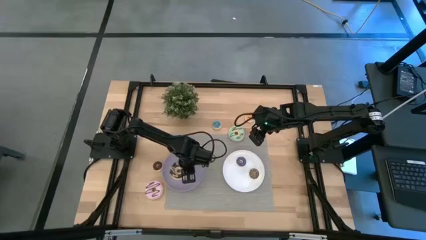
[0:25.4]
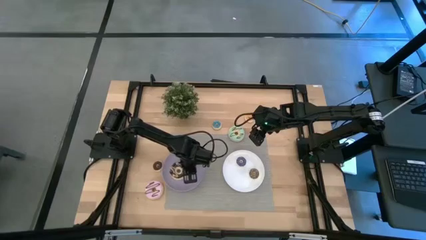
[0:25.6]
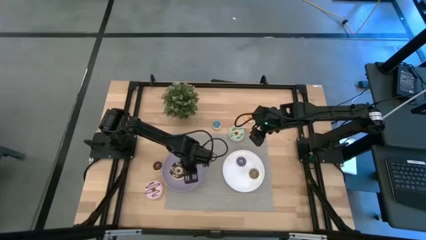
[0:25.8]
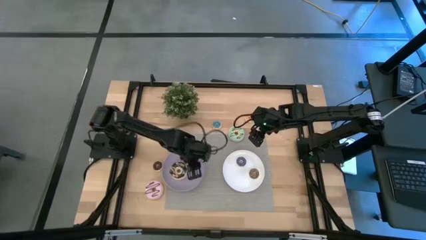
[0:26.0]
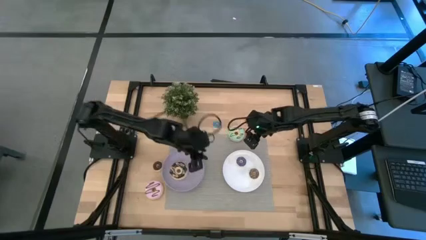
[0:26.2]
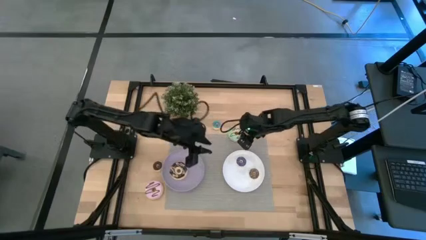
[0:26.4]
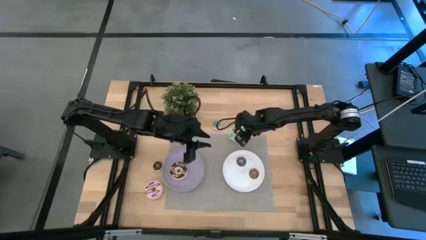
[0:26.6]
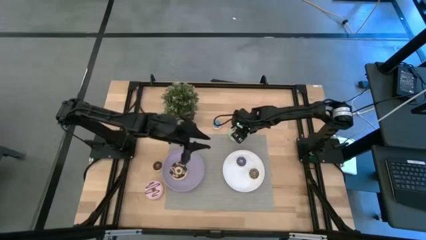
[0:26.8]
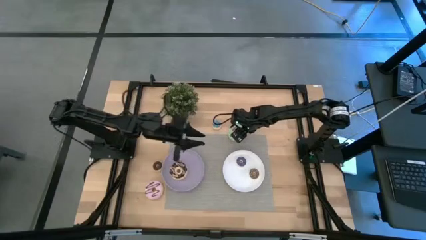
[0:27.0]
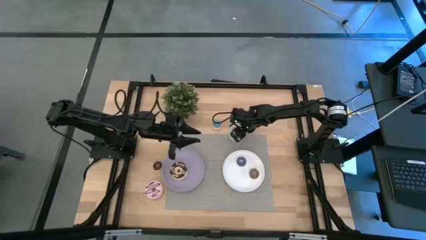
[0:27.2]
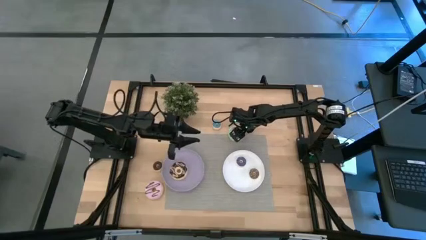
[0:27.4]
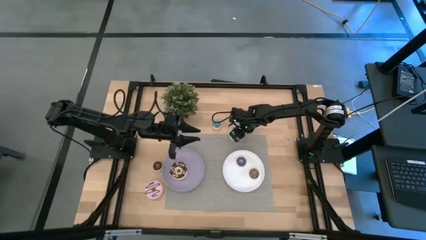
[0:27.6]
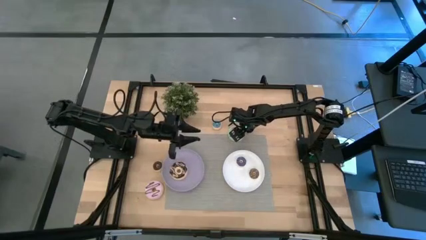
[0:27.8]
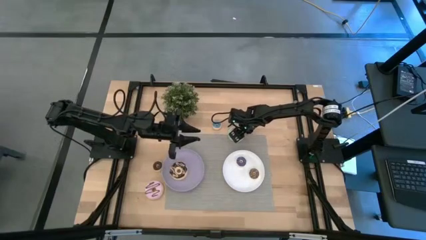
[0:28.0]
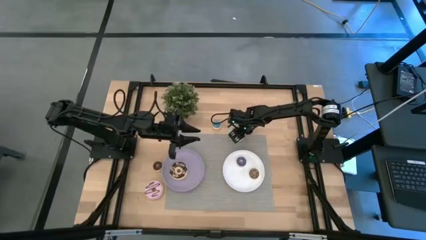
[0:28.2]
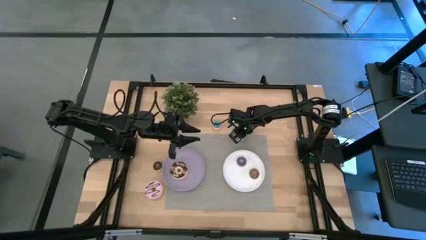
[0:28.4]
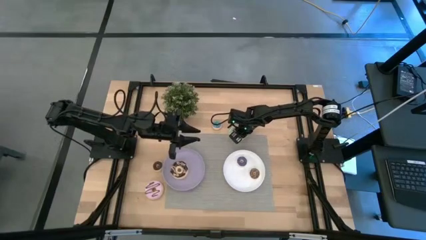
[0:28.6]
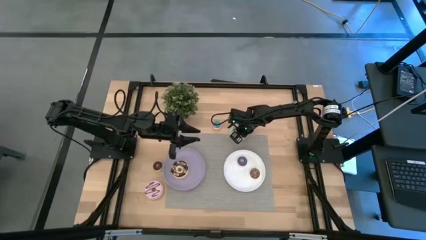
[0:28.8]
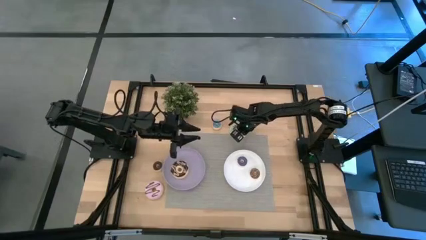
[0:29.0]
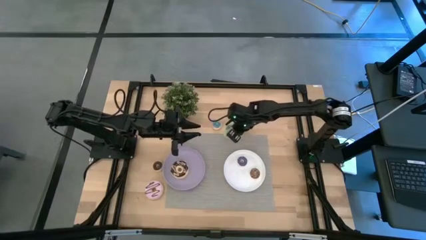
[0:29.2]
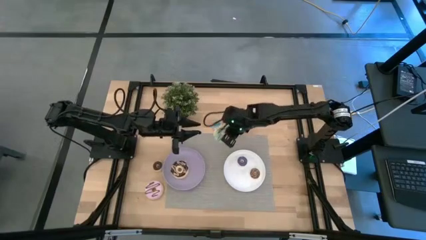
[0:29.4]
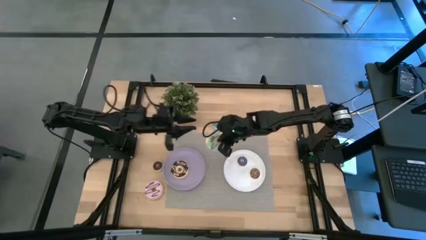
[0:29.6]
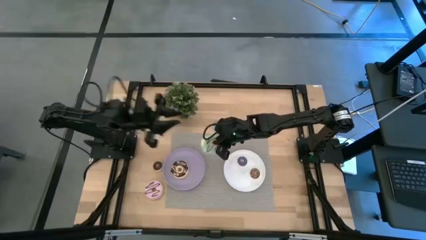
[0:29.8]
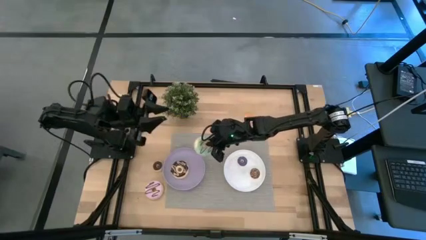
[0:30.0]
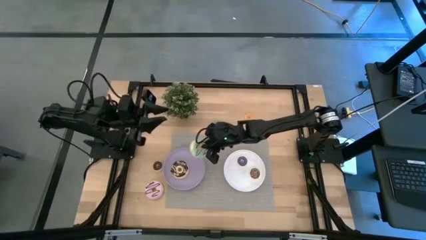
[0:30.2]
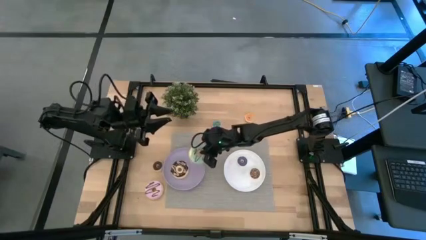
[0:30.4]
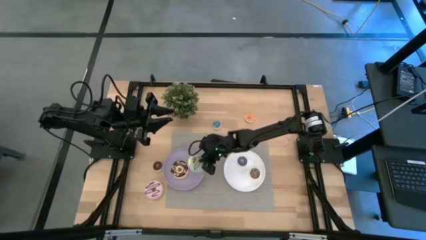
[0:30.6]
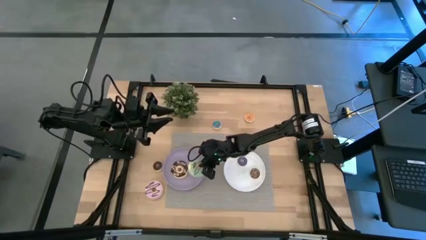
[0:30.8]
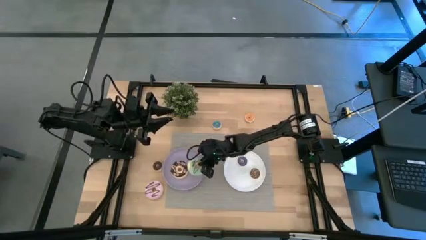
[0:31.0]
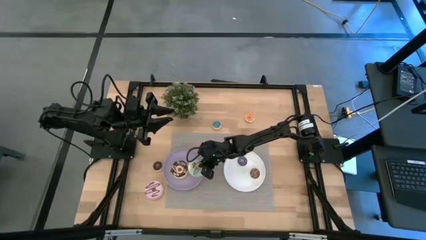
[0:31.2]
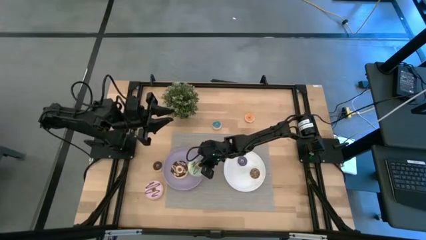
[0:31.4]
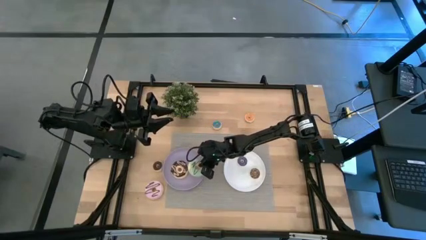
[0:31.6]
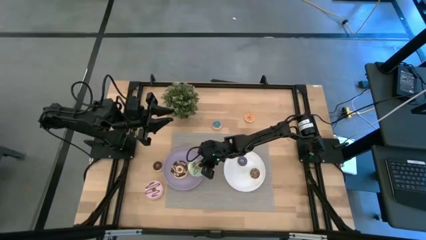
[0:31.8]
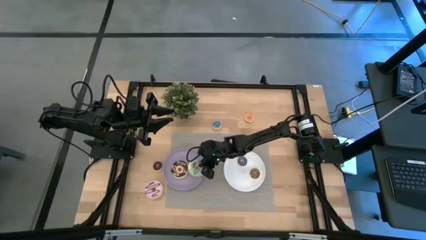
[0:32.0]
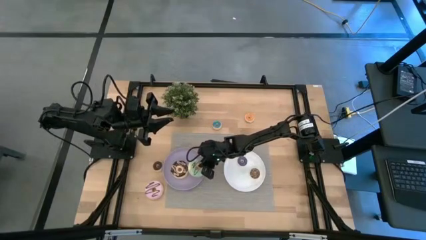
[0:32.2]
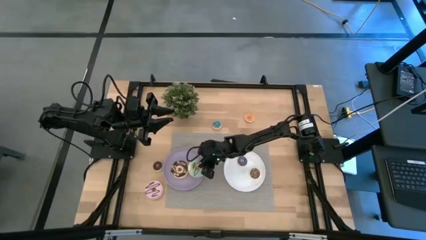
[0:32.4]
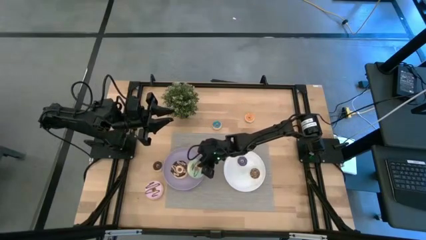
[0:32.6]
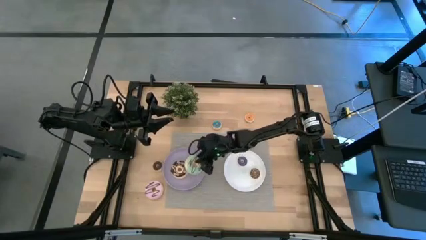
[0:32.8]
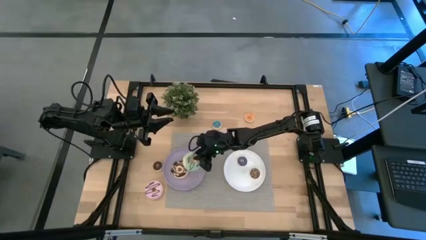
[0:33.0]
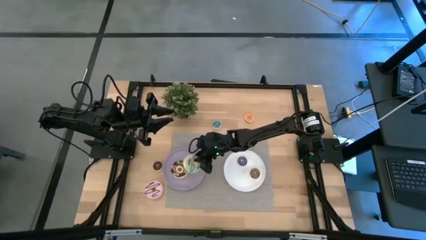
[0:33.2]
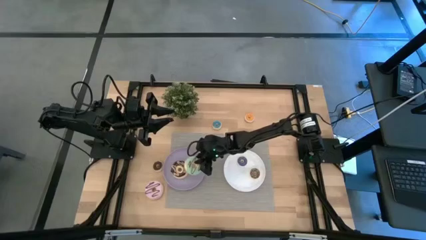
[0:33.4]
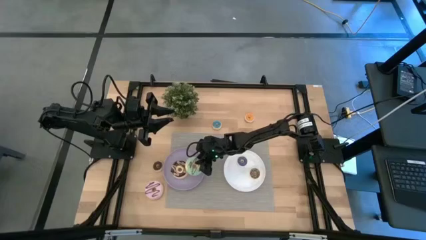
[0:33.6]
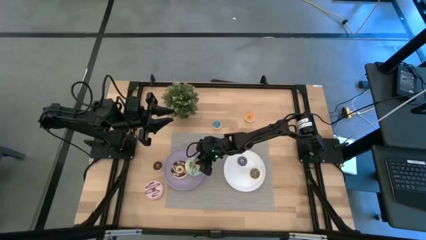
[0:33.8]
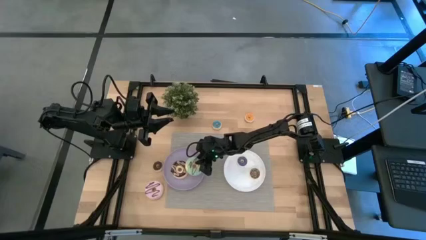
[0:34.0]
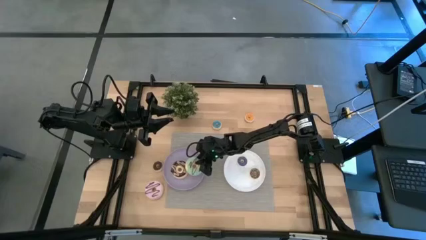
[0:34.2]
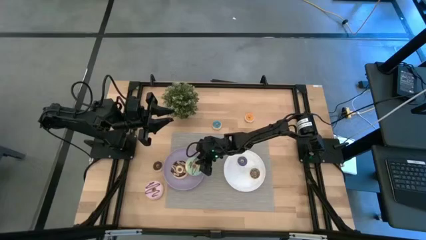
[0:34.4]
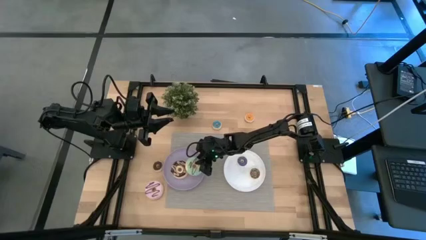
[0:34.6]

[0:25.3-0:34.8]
Task: Pick & Place donuts
Put the large green donut on the purple plate

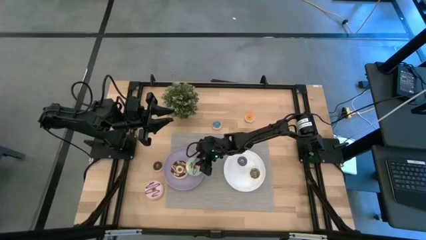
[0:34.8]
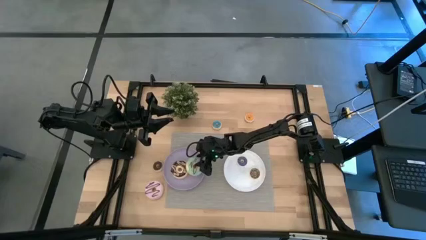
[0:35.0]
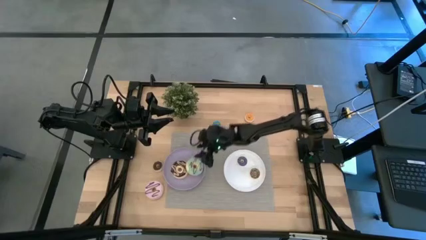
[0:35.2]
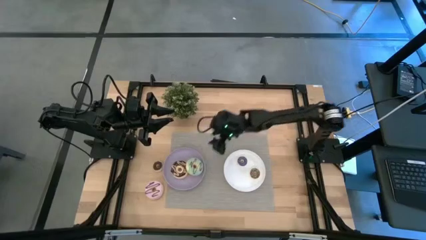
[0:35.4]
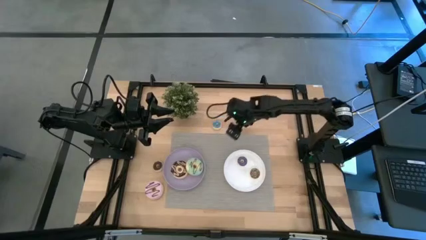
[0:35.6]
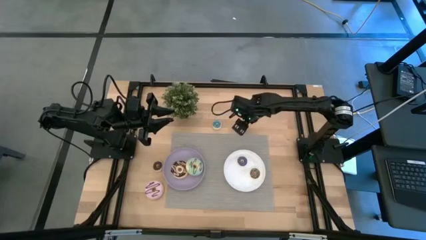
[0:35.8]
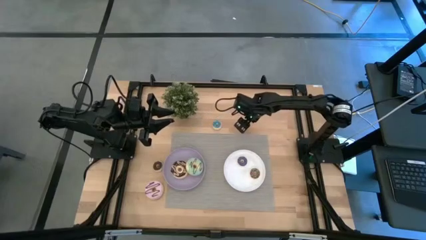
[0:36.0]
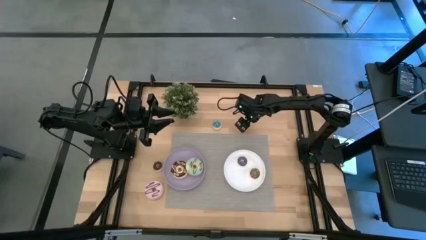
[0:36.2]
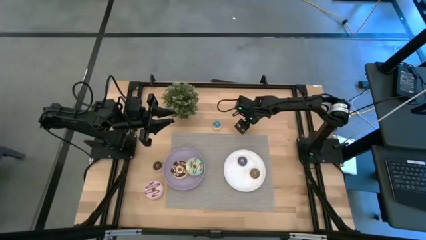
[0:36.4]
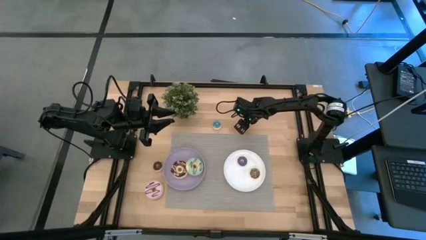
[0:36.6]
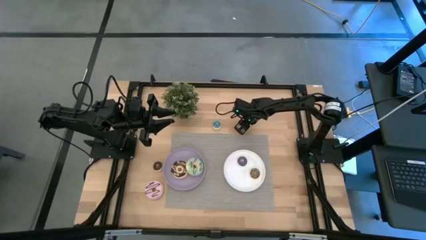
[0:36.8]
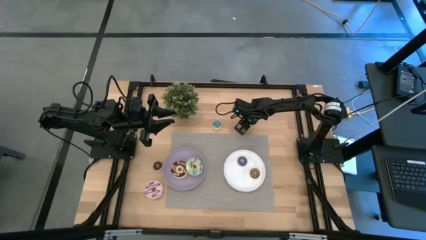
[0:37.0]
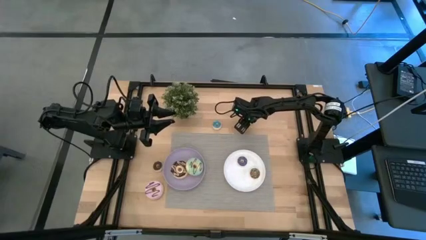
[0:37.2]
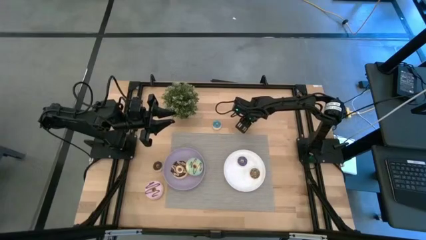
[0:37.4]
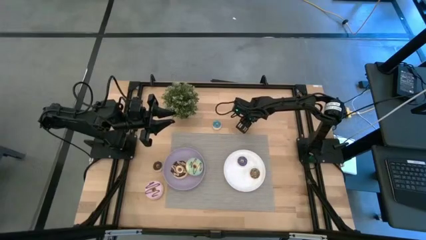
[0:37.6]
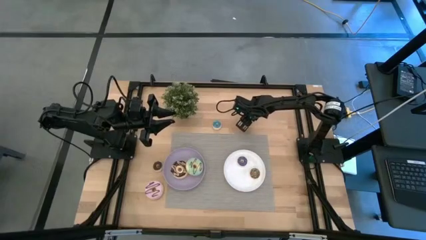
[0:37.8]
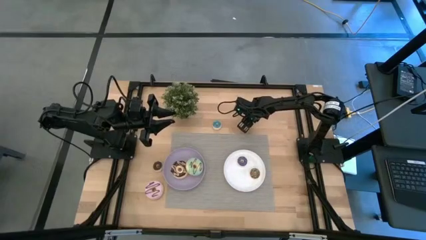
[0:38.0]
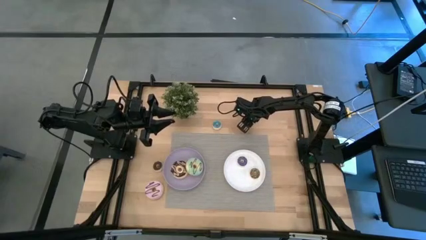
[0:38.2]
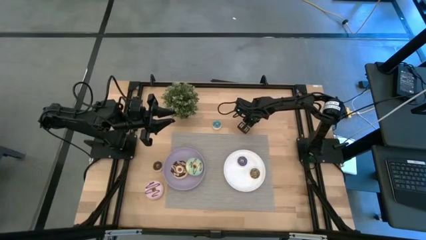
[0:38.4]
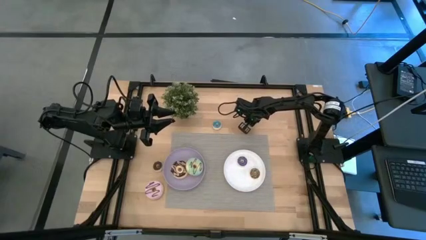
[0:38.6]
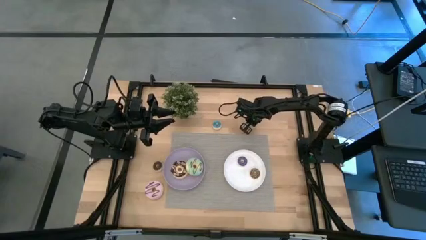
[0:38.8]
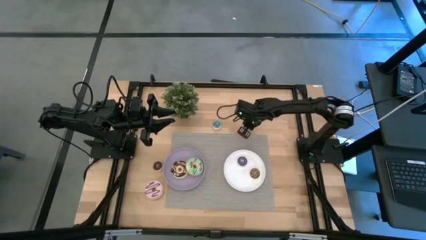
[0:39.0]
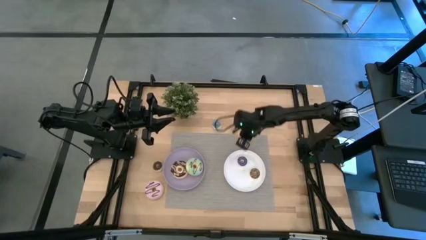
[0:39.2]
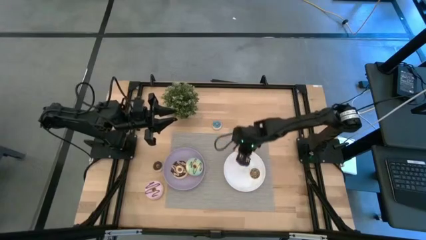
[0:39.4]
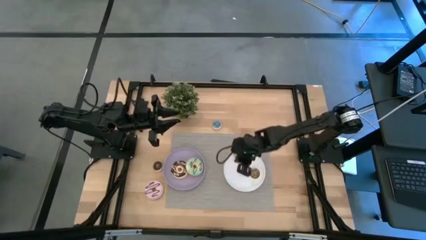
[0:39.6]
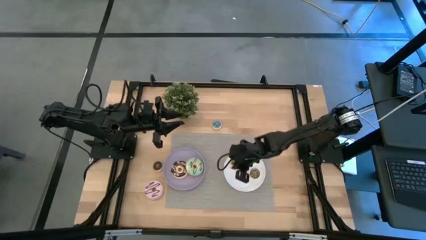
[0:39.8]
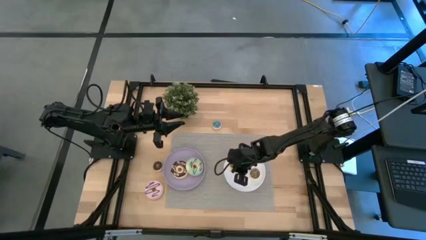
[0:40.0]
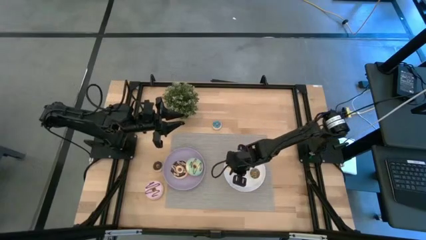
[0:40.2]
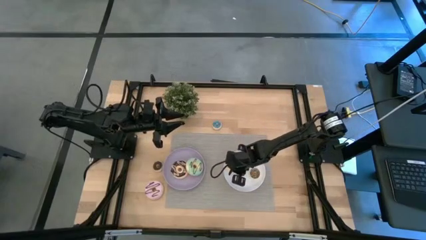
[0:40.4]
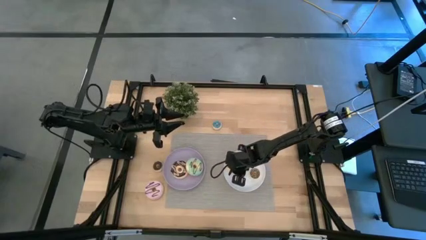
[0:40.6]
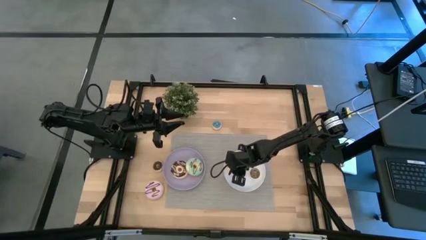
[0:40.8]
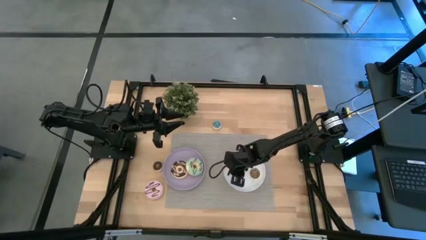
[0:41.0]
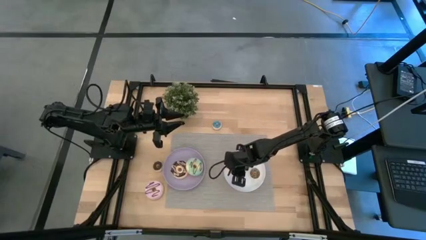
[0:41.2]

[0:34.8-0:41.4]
Put the small orange donut on the white plate
